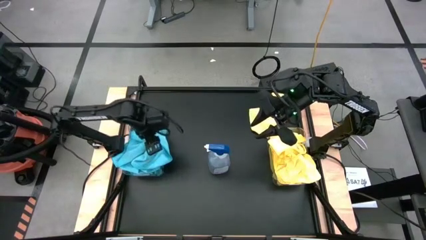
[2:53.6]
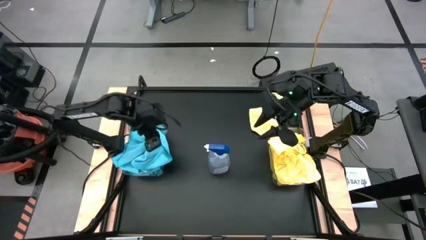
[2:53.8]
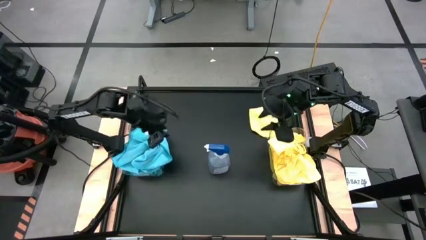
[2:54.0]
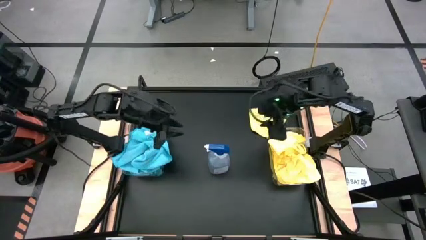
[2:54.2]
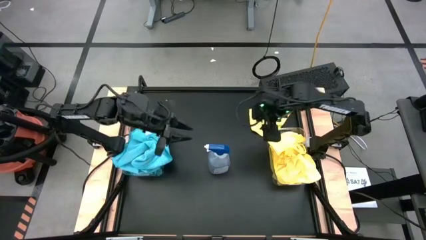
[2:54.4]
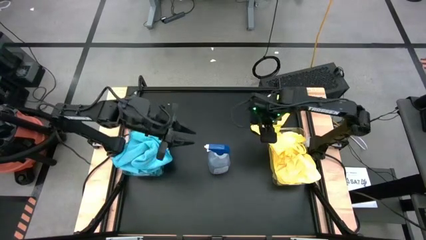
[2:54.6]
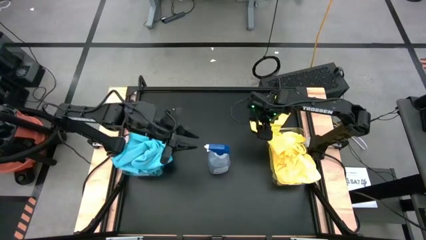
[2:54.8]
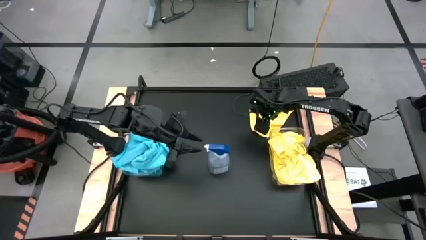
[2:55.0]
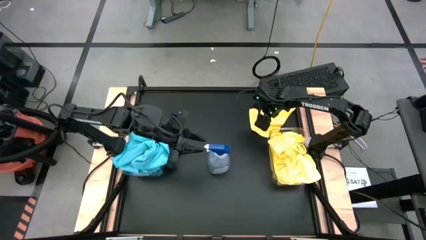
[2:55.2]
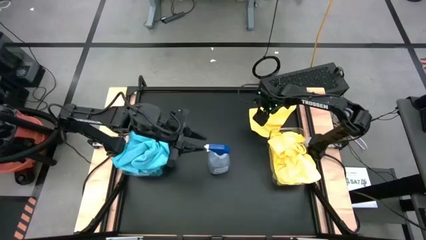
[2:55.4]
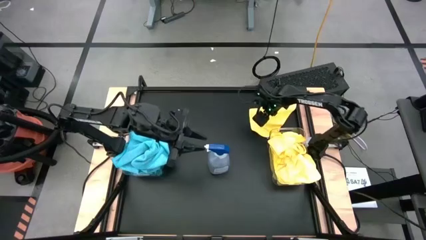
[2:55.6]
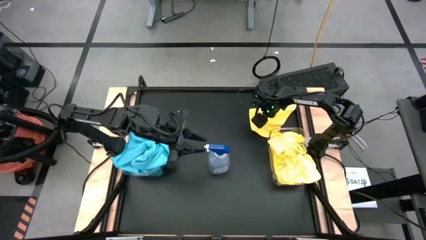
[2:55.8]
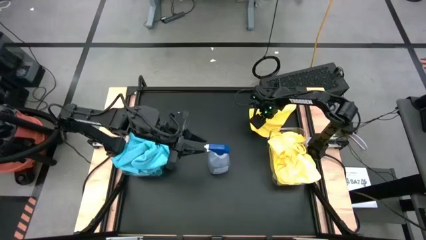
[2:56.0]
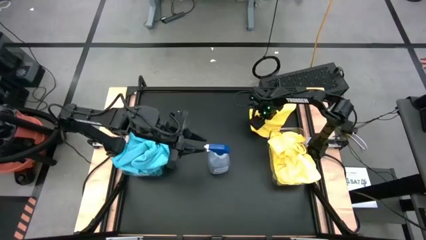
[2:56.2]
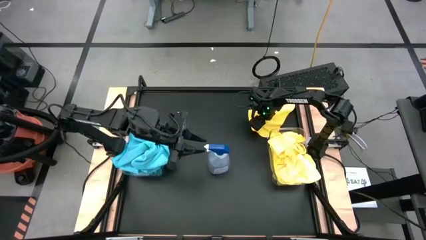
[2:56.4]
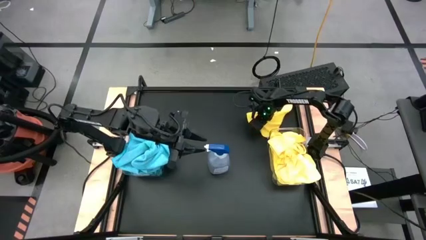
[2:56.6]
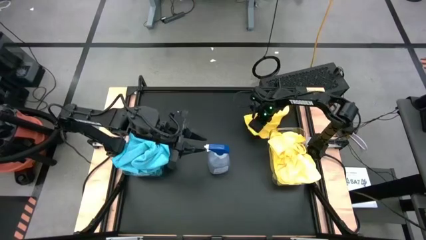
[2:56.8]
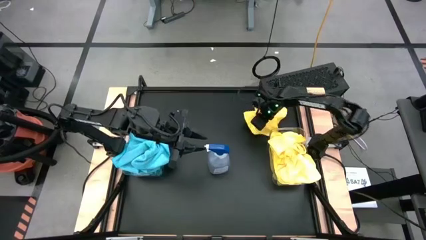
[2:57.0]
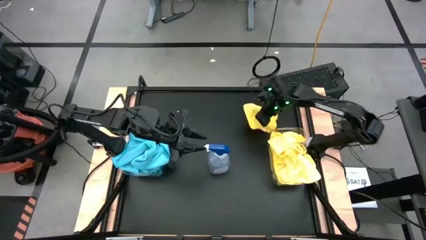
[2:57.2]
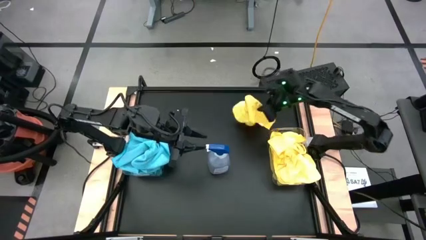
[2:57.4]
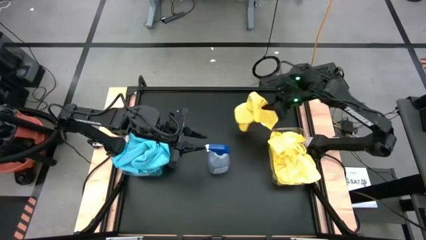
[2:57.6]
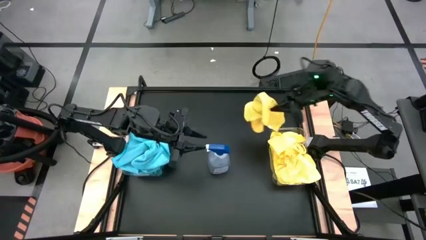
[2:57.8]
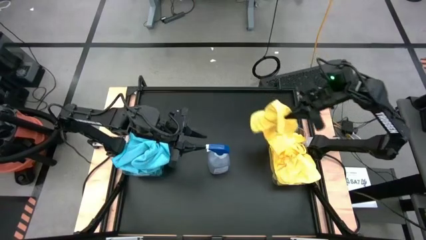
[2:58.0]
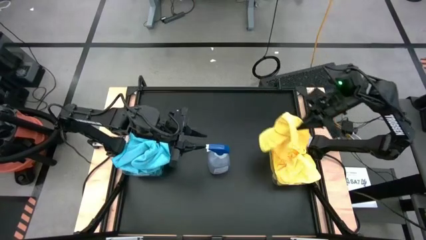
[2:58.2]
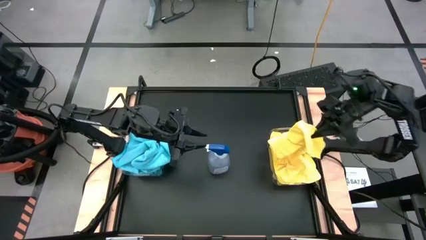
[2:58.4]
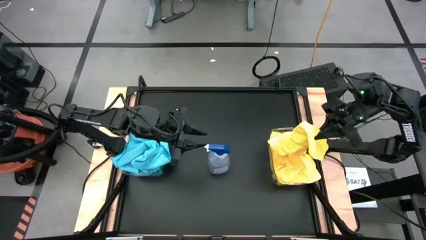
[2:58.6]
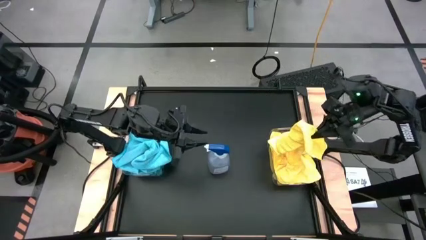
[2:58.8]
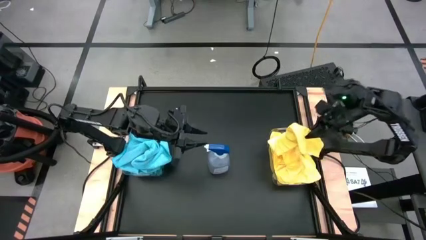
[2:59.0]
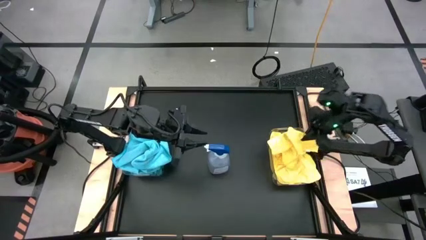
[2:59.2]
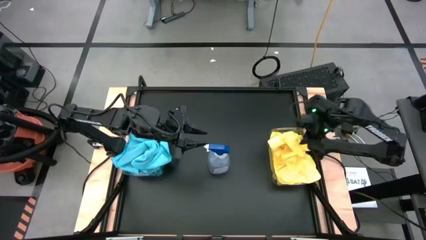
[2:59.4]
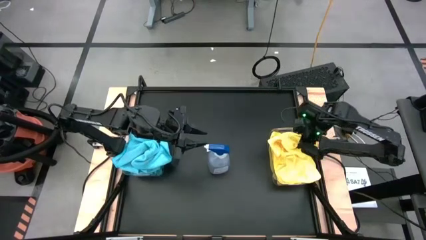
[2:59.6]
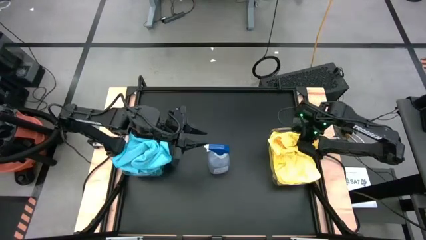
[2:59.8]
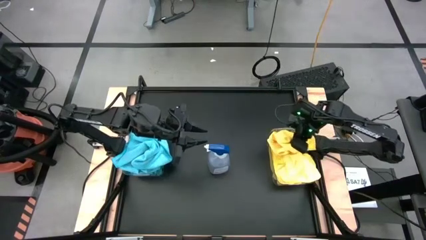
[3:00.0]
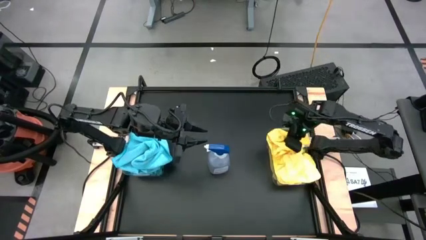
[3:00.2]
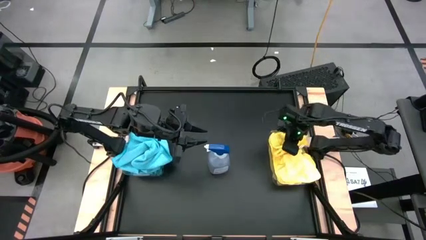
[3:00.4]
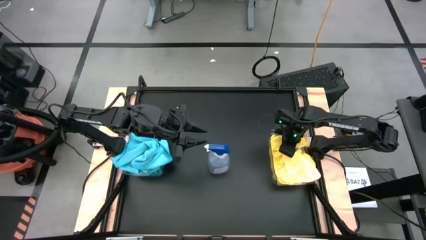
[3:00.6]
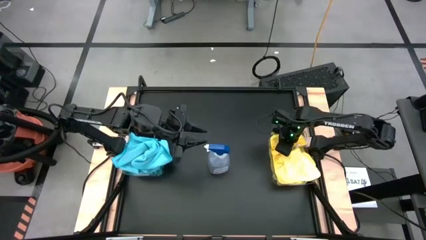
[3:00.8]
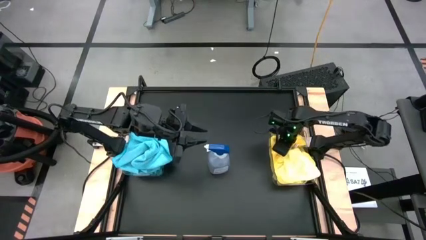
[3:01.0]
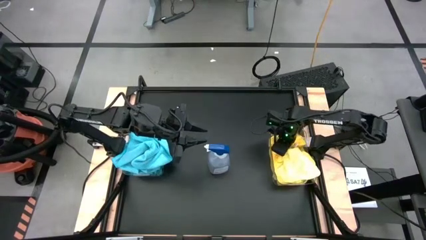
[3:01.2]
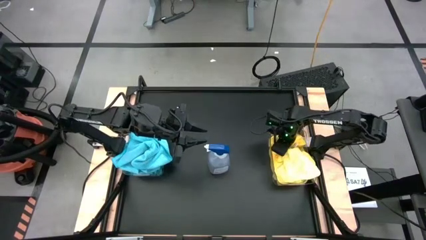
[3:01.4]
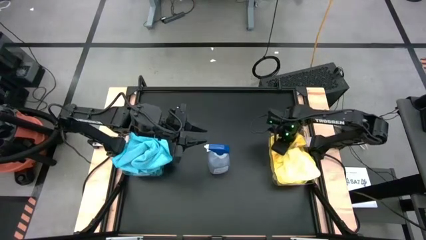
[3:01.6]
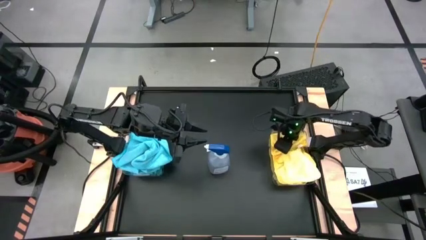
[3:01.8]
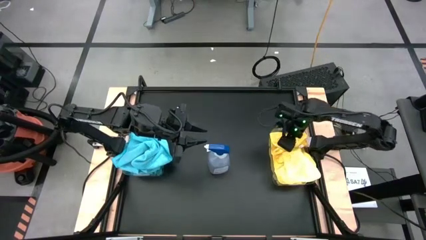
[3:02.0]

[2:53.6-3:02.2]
Task: Sort microfiber towel by color & place in baskets
Put the yellow microfiber cloth into the right transparent bin

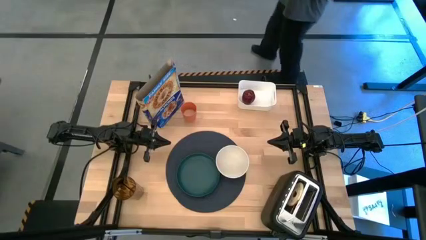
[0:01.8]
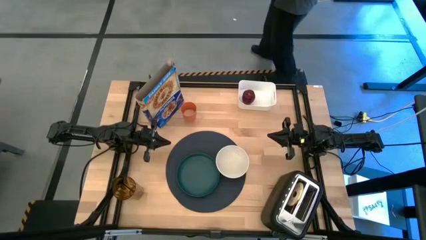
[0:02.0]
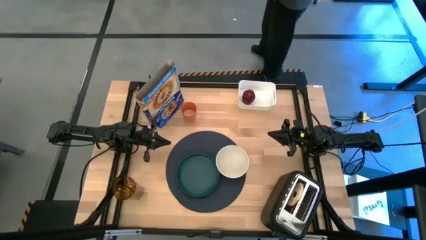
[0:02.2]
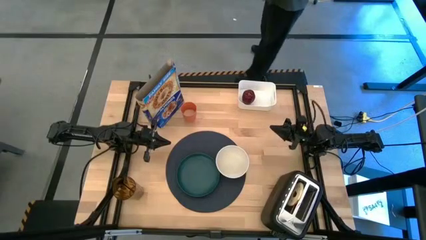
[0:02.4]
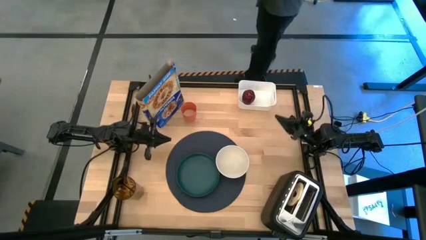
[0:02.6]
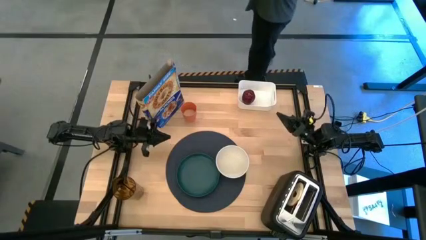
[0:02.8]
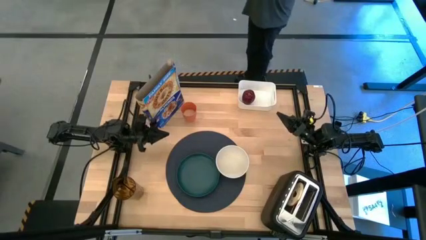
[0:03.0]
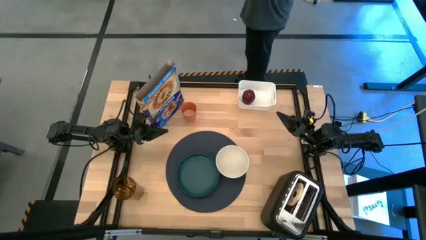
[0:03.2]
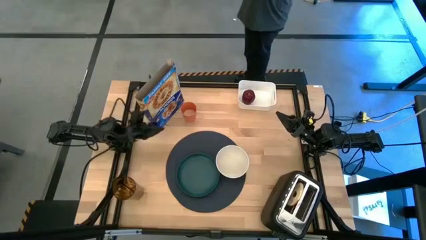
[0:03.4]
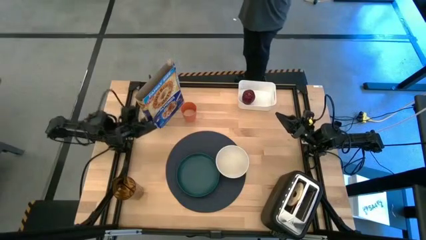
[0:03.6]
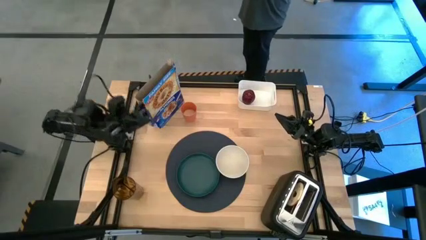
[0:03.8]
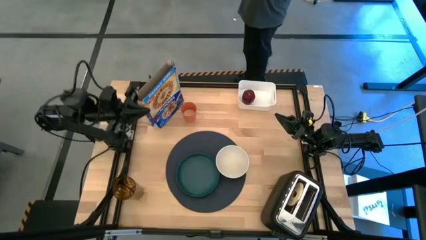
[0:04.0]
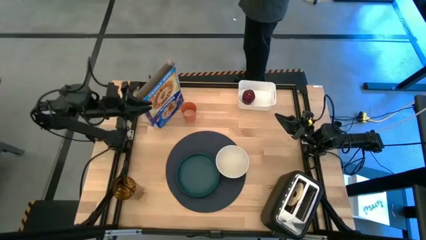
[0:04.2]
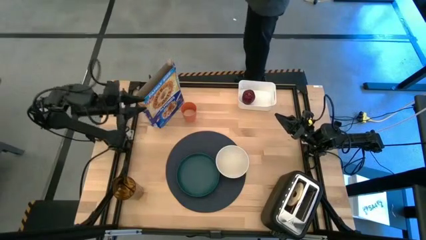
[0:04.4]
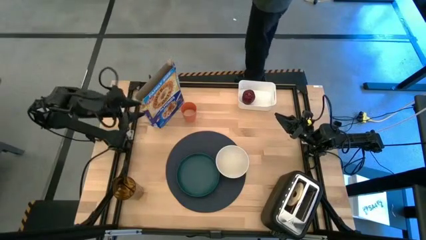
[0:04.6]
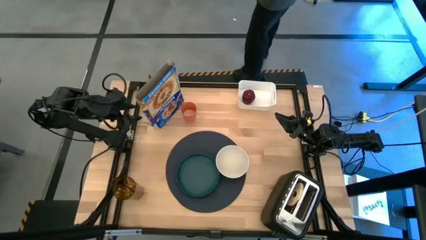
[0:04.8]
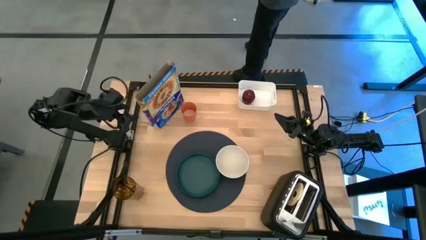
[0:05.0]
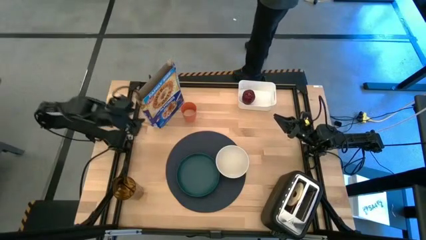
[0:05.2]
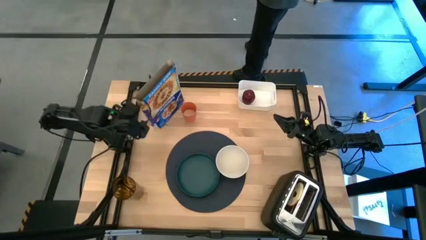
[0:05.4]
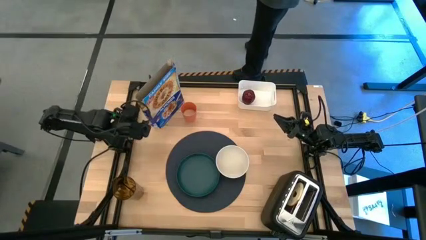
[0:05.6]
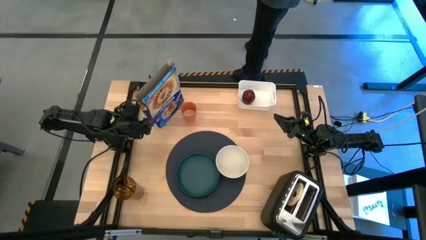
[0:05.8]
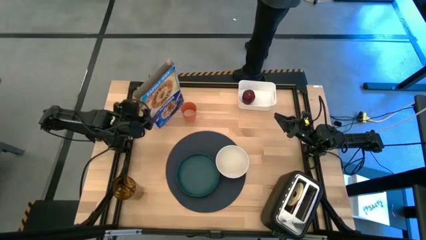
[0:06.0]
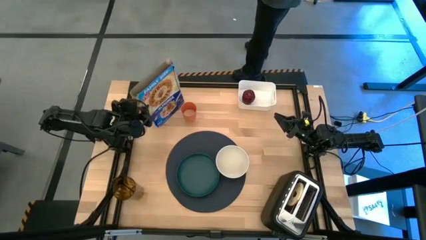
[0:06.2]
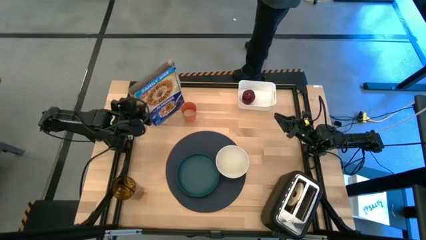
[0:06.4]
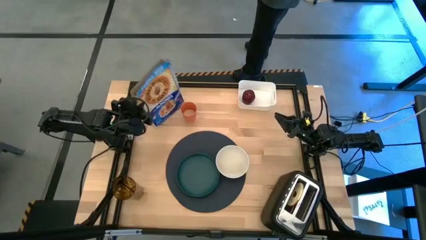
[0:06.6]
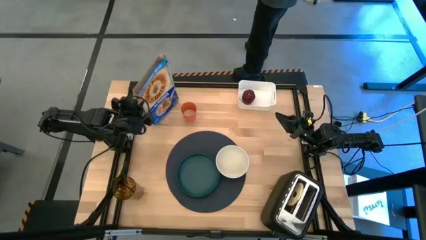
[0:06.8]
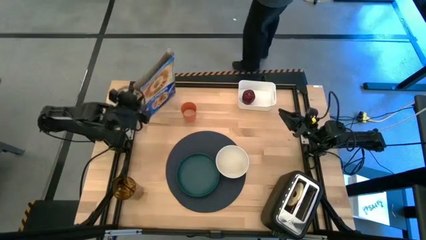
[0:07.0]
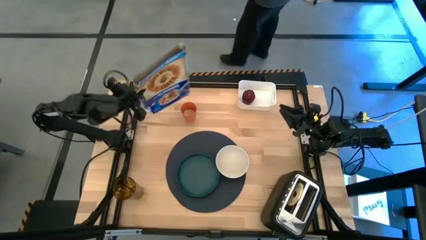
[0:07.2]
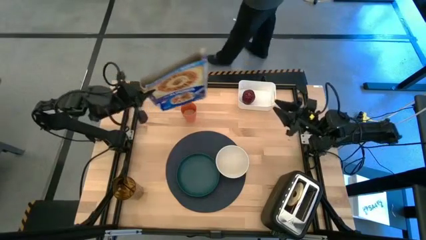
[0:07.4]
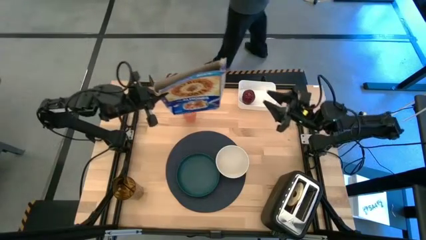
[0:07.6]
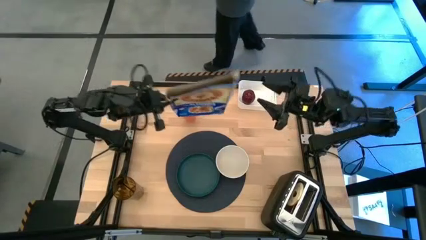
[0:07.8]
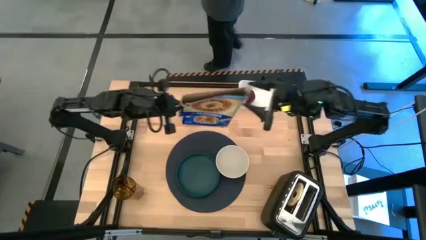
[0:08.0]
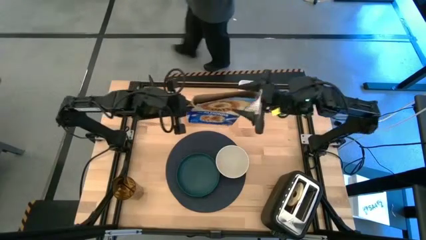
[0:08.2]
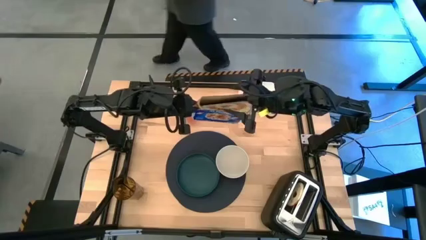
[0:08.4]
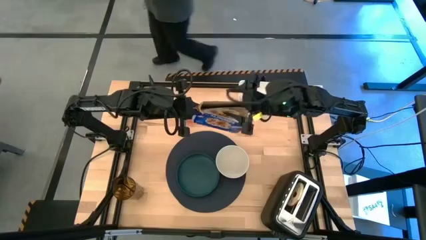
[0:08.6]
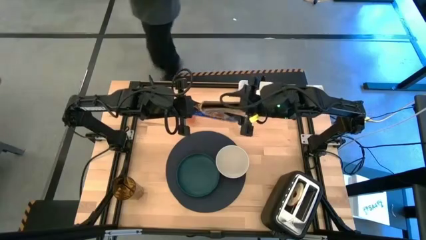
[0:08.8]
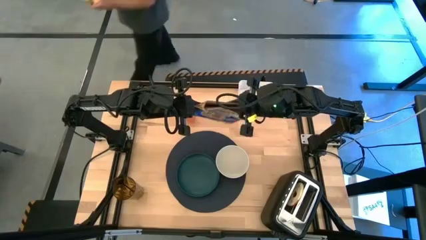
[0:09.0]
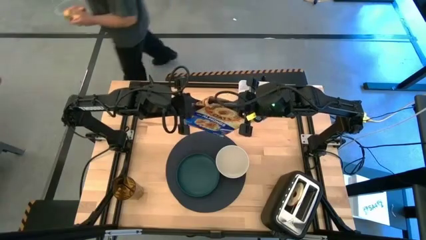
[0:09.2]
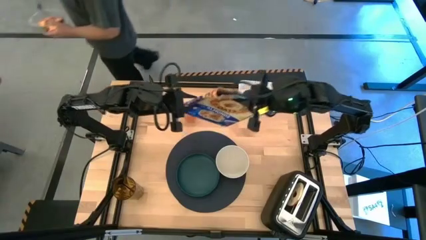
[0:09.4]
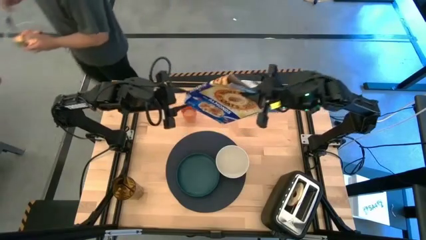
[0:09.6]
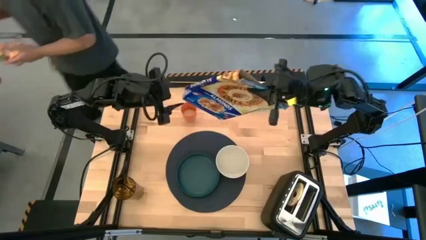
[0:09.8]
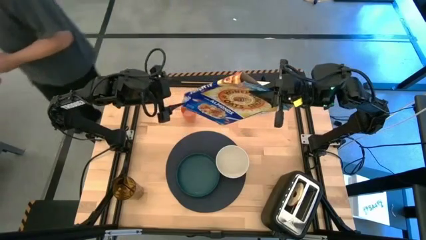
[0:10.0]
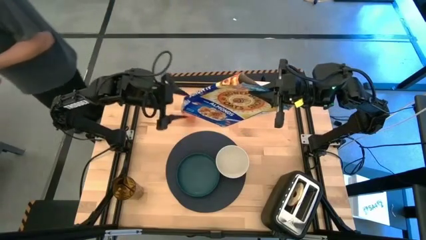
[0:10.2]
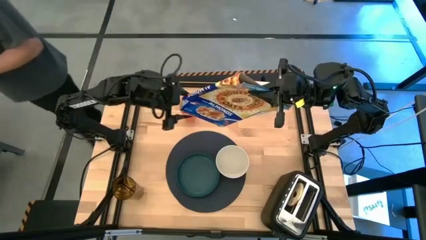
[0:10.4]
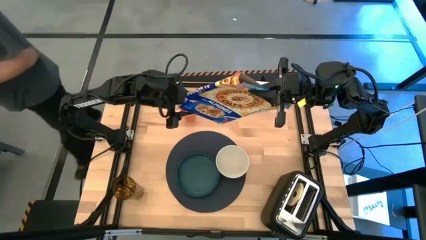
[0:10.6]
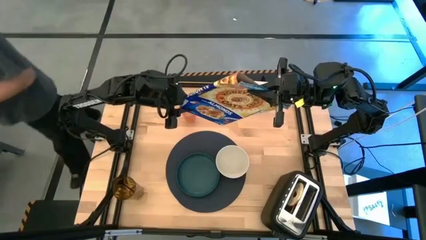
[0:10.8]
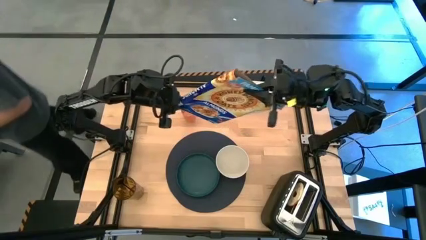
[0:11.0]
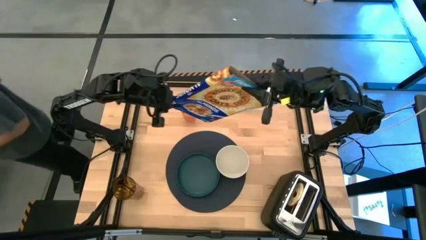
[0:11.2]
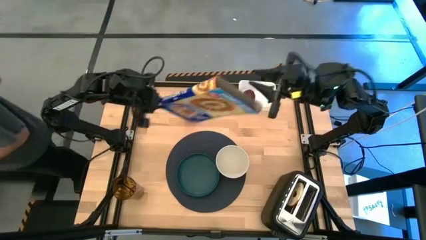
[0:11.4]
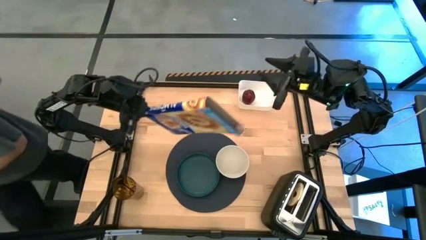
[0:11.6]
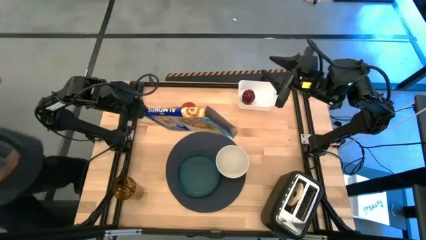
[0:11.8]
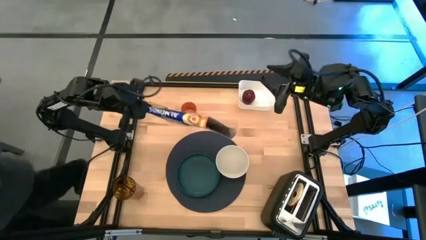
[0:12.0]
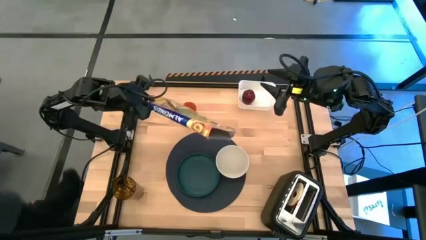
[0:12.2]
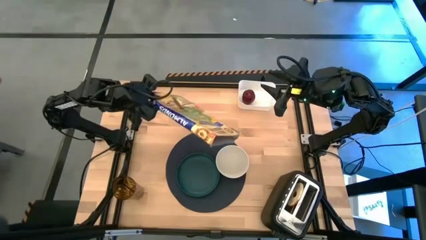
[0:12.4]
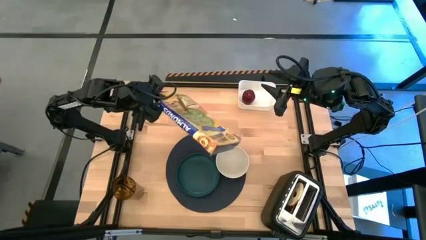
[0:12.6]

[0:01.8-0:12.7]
Task: Arrange a breakfast setting
Pour the cereal into the bowl
